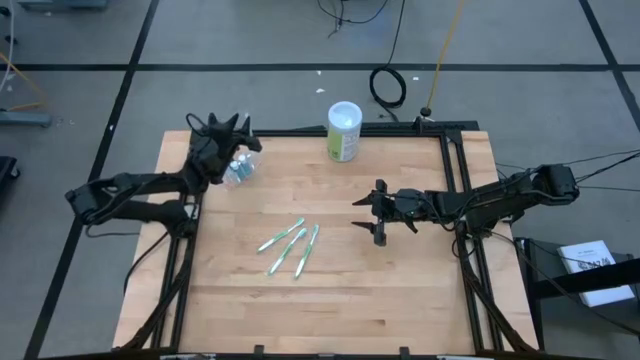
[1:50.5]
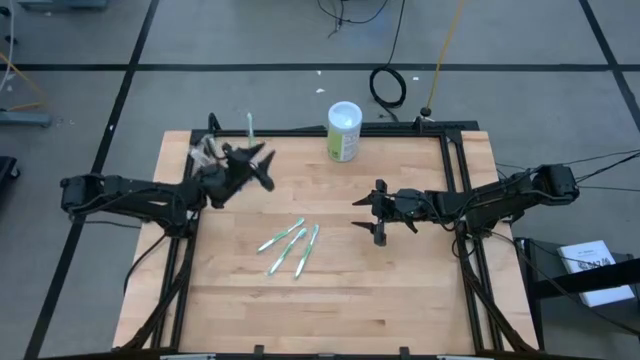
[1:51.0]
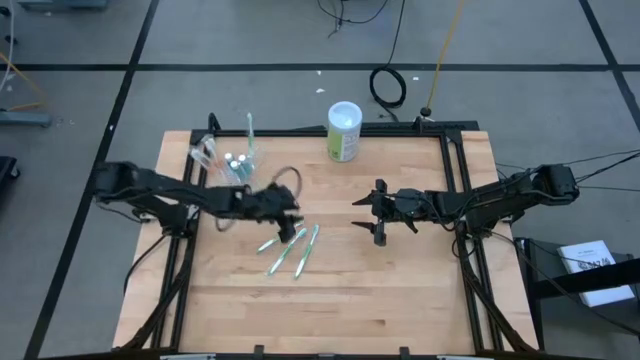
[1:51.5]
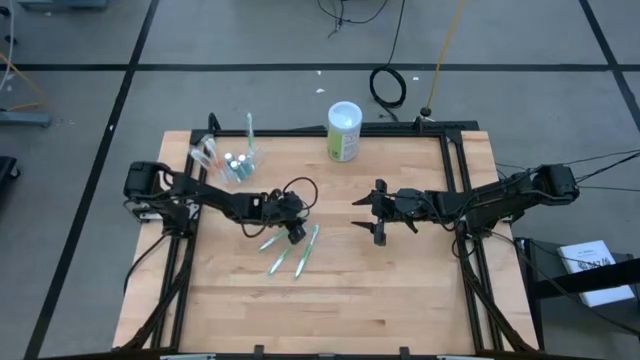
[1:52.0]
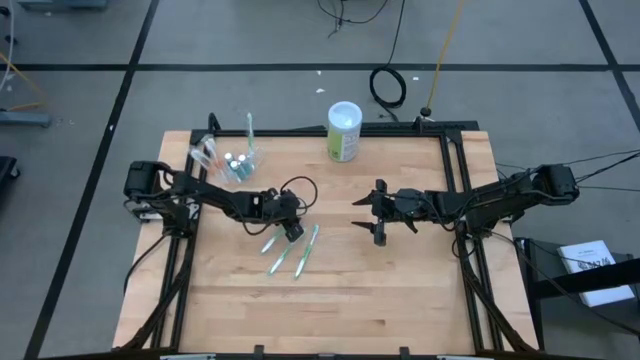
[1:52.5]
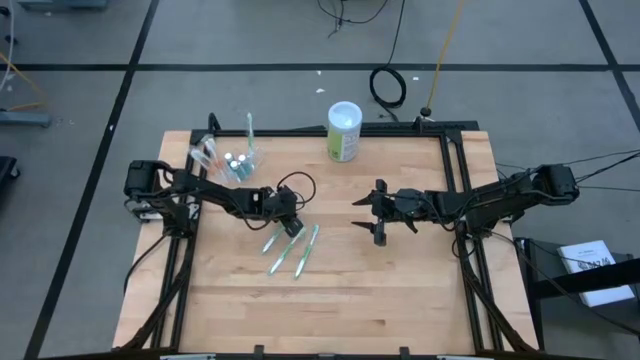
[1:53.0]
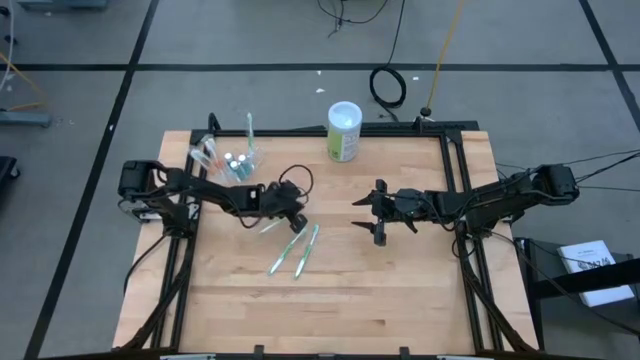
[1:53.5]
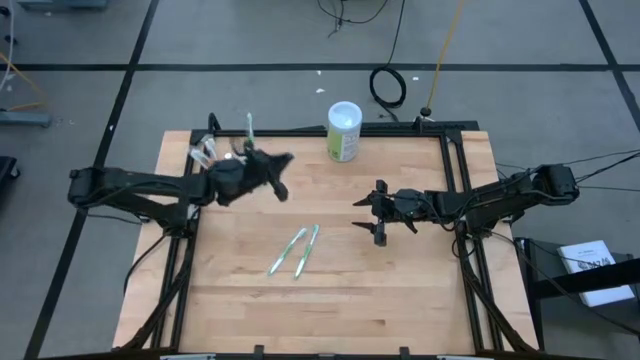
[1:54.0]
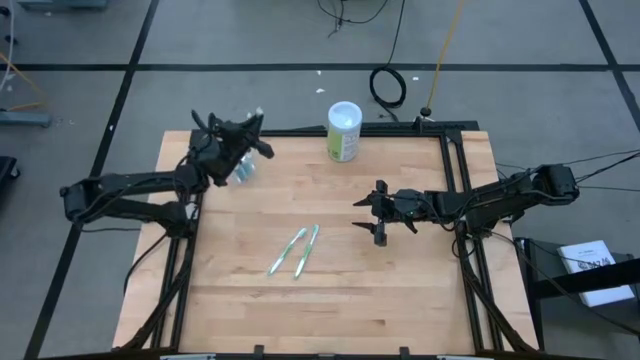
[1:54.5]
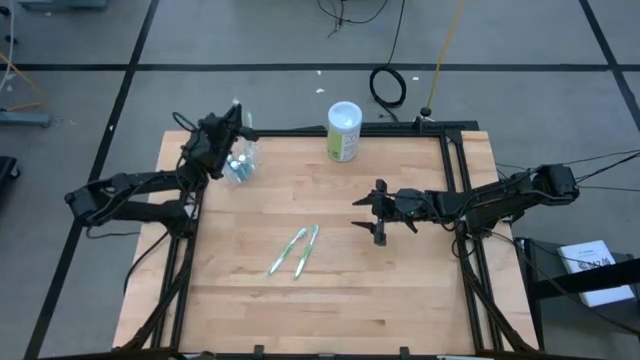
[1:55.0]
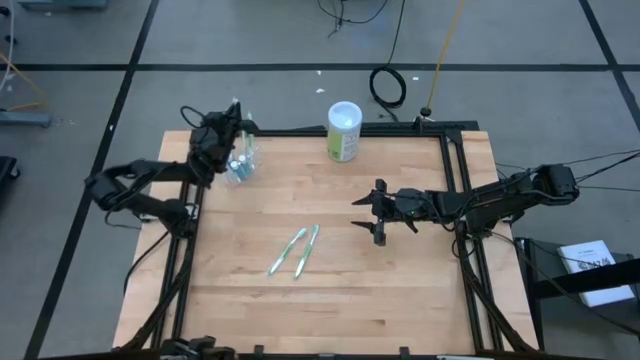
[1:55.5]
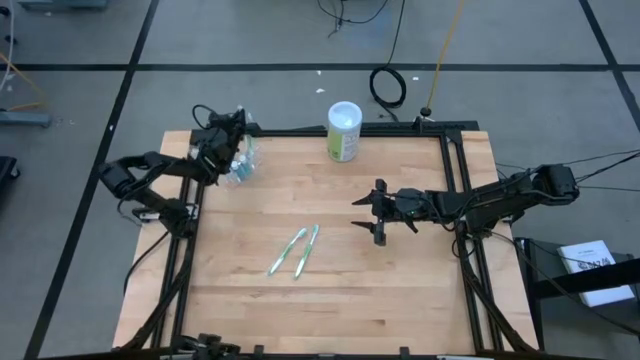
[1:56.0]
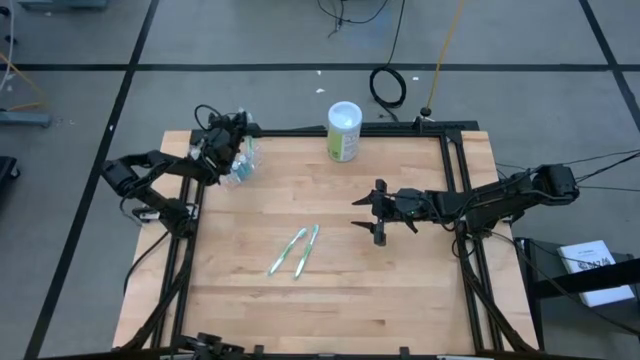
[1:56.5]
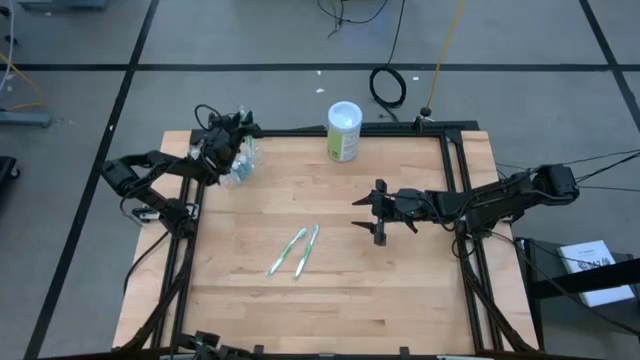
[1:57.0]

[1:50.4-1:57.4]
Task: Pick & Place toothbrushing station
Put the green toothbrush into the right section of the transparent organizer

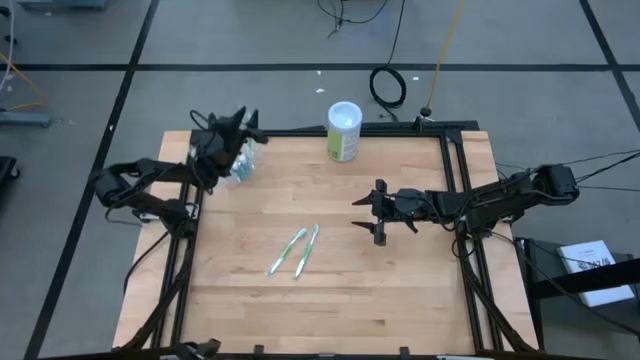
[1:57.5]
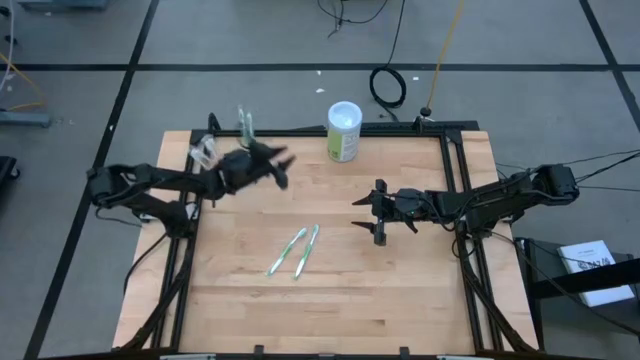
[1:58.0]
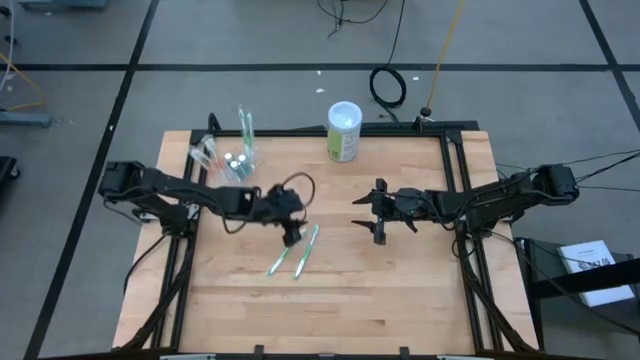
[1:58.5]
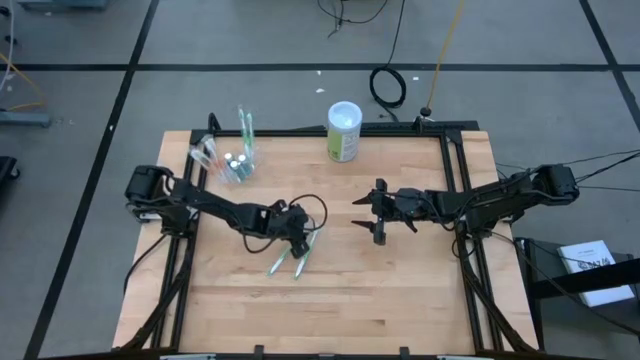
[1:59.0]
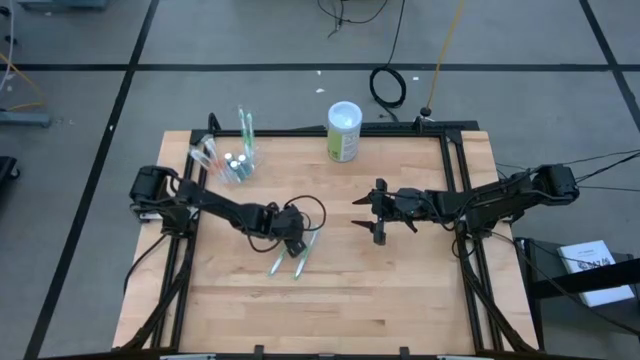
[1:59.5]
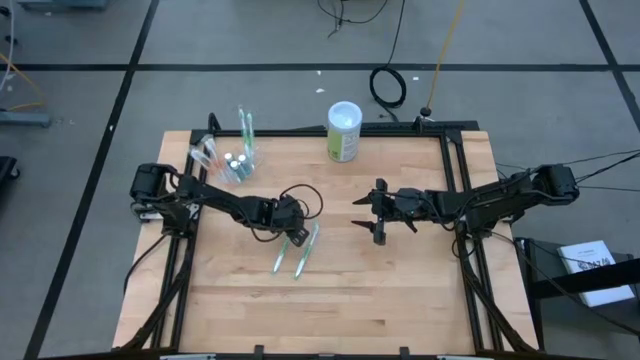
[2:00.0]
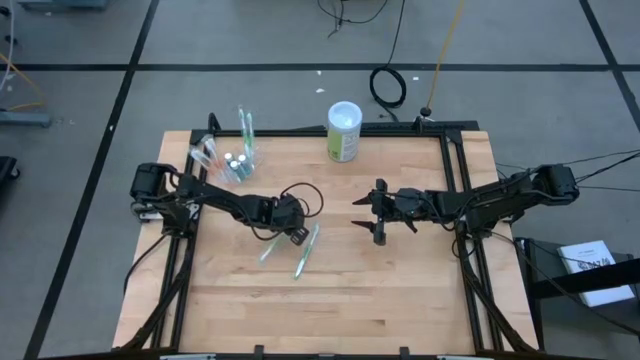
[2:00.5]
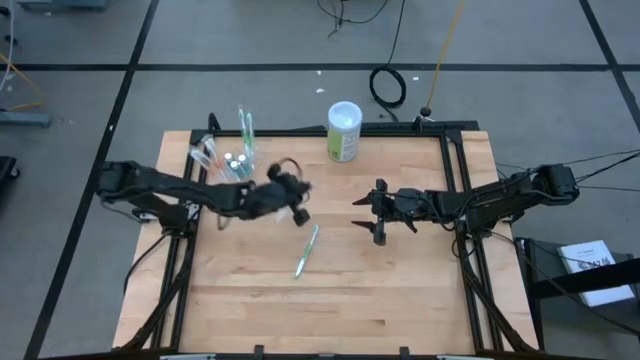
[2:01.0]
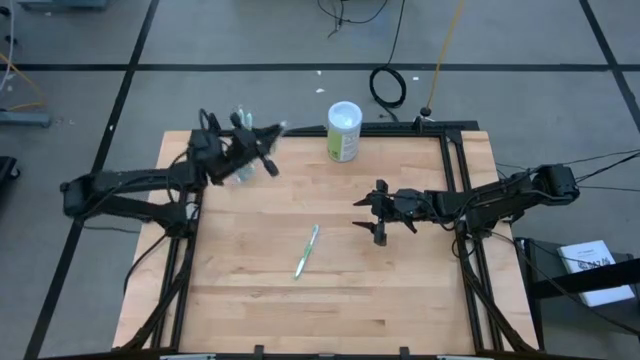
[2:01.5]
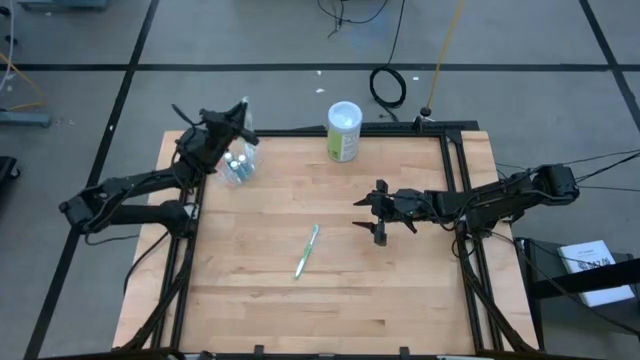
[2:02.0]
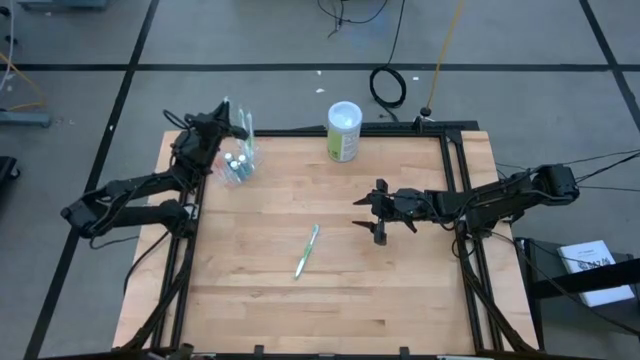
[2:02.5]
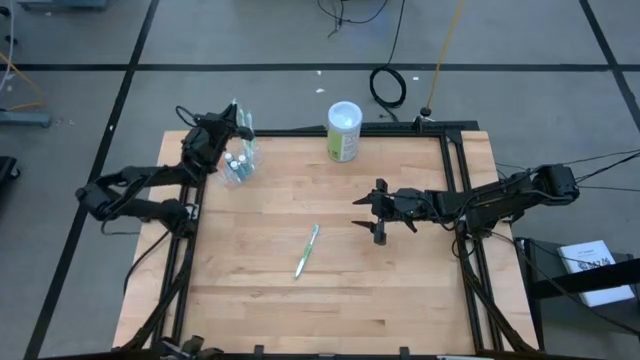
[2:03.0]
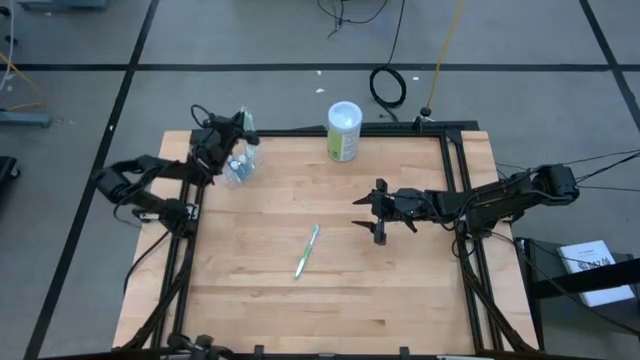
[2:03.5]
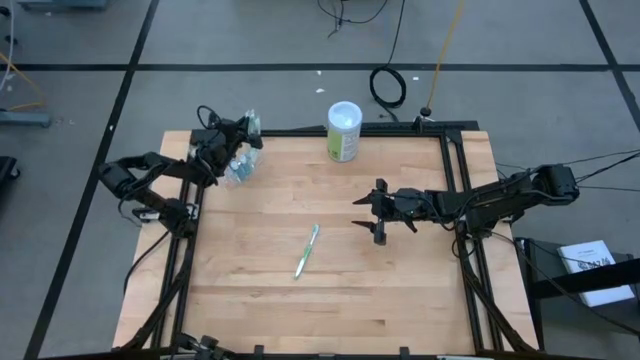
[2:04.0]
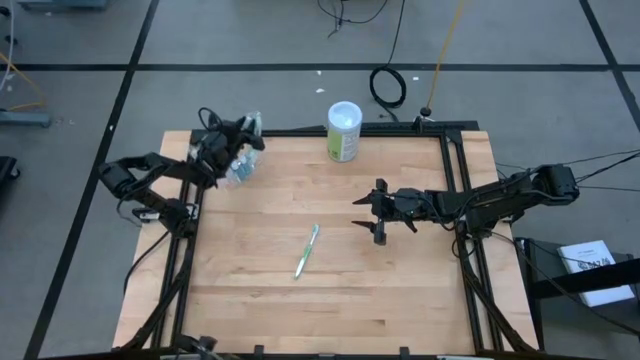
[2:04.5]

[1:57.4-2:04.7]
Put the green toothbrush into the right section of the transparent organizer

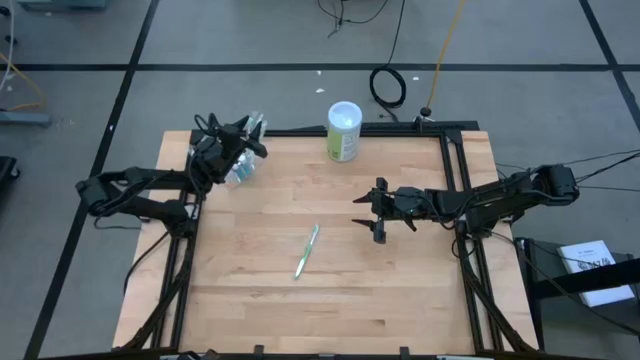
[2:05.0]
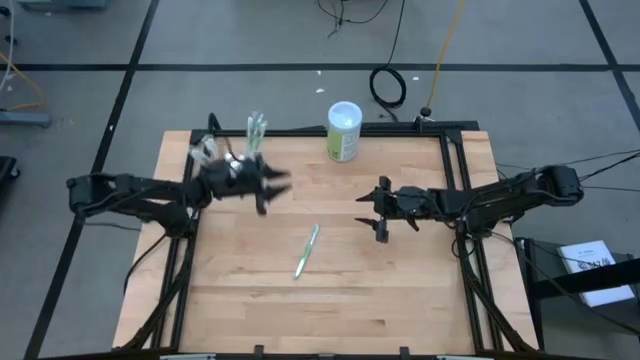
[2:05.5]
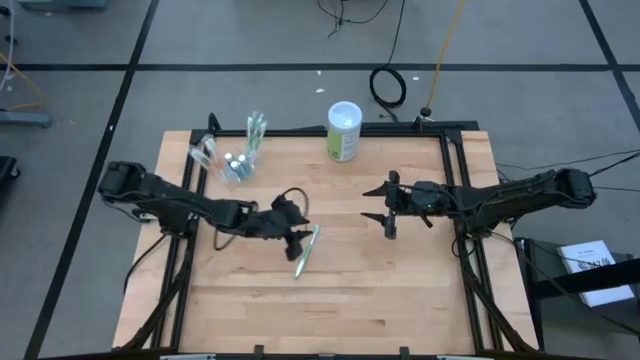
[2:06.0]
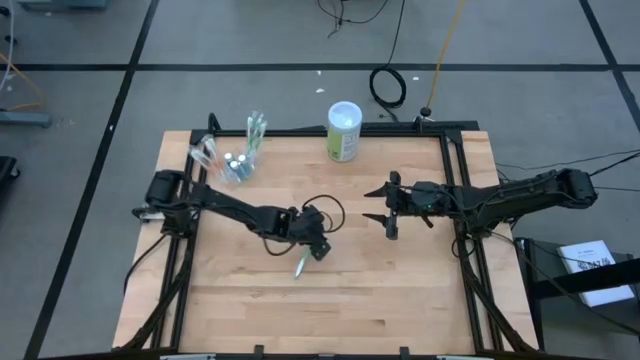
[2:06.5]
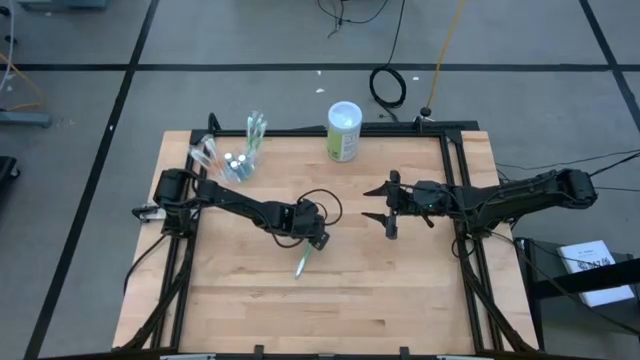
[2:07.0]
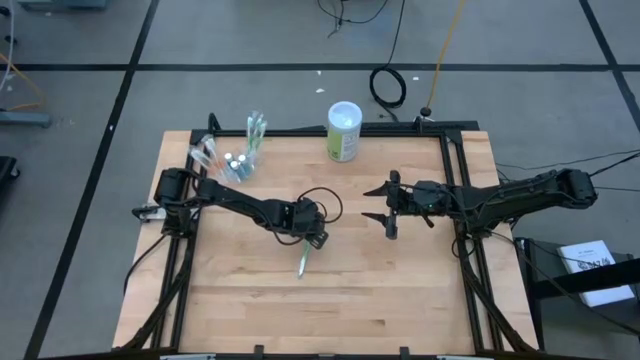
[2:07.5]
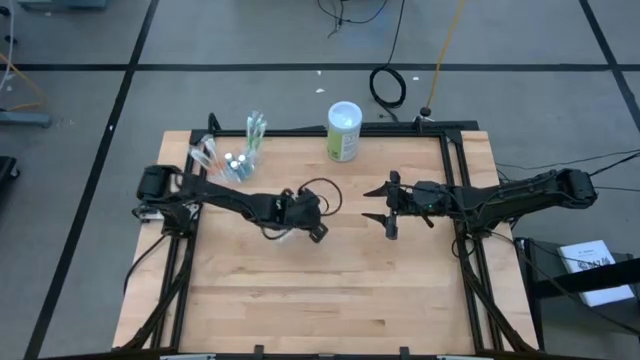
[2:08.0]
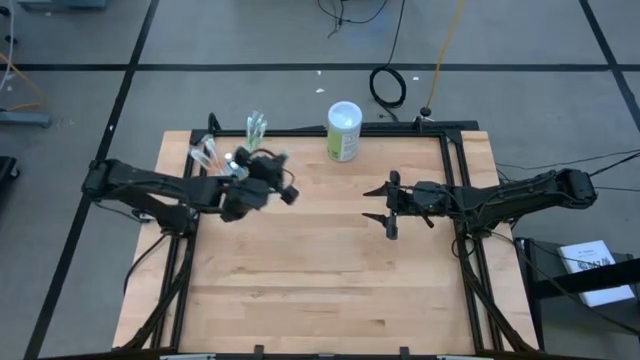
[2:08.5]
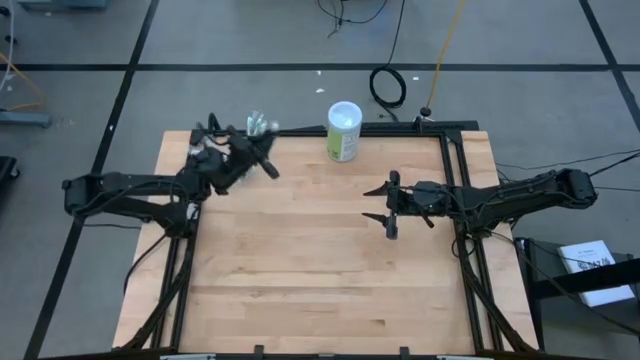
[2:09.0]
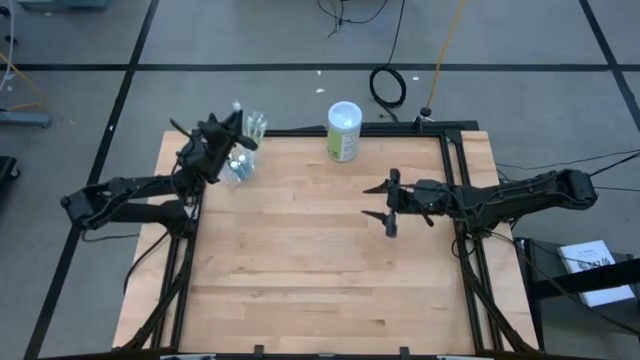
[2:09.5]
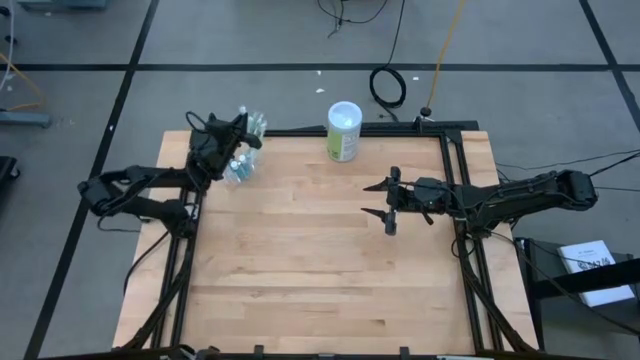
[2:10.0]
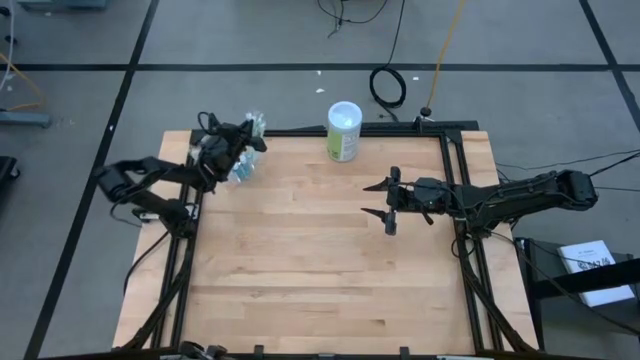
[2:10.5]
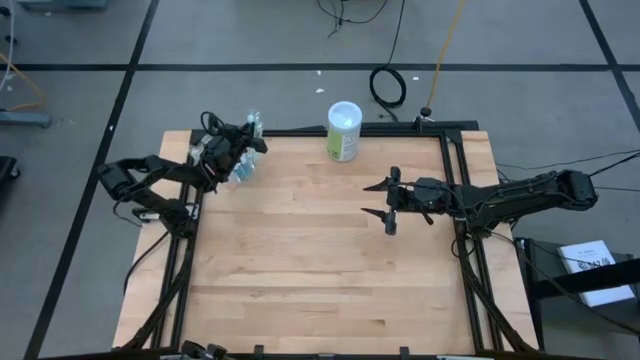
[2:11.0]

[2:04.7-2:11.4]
Put the green toothbrush into the right section of the transparent organizer

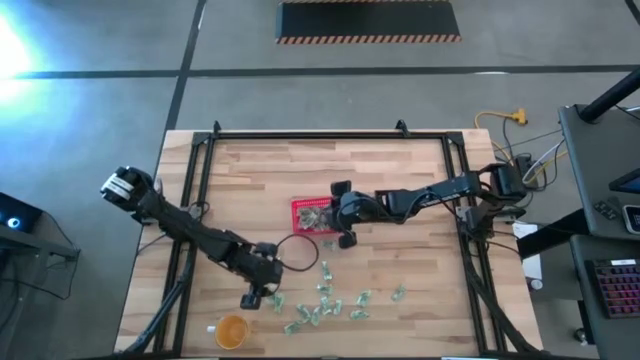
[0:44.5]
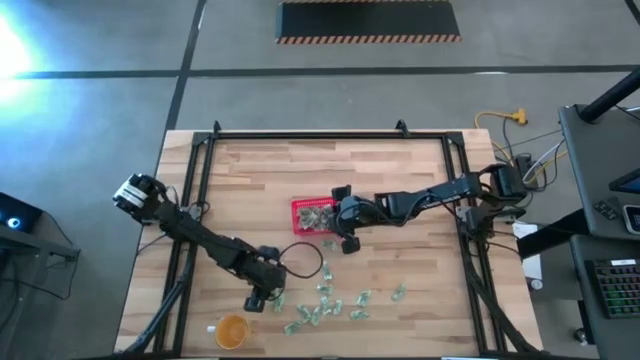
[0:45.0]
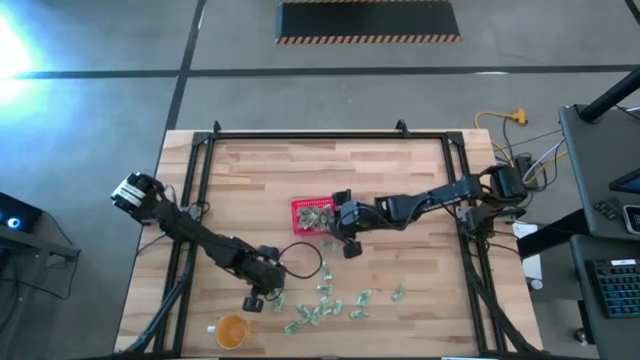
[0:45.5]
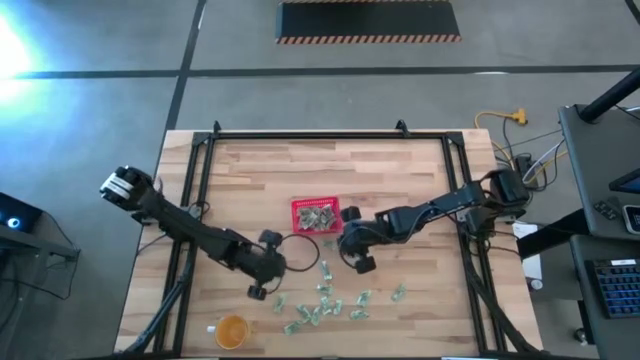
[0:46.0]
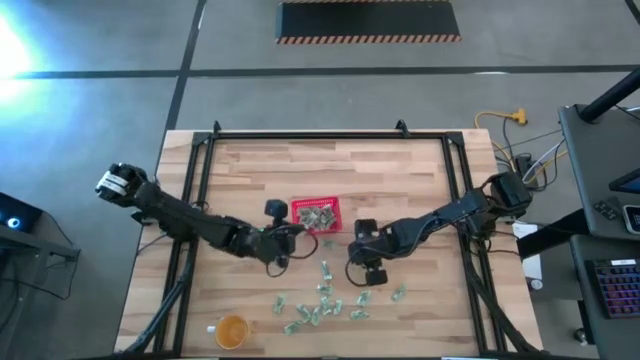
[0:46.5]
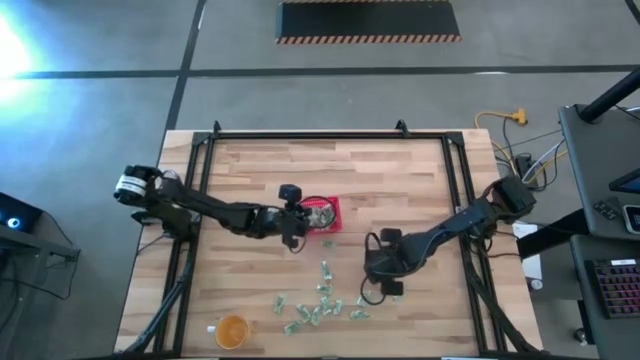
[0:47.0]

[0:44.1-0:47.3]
Task: Pick and place items into bin
Put the stevia packet into the red bin
